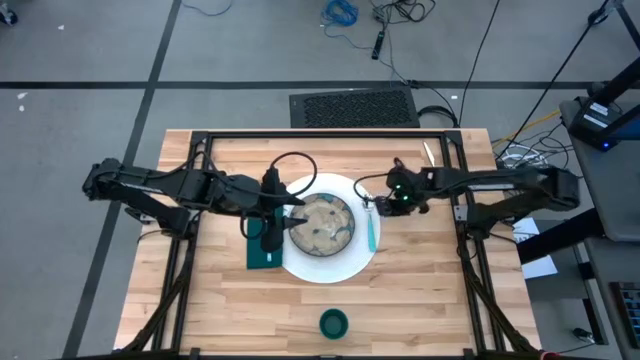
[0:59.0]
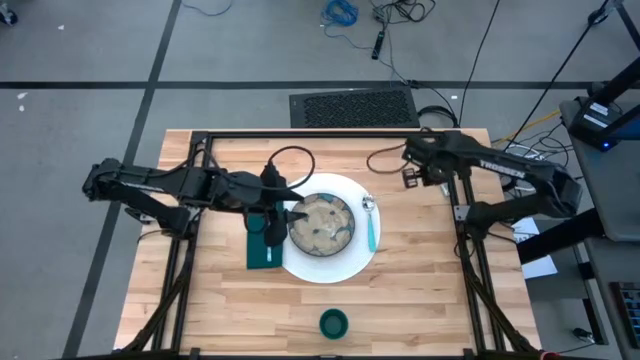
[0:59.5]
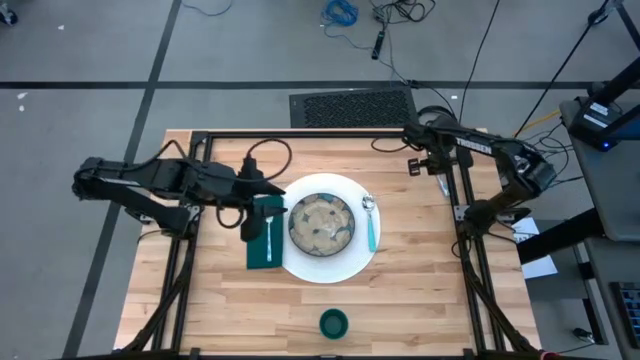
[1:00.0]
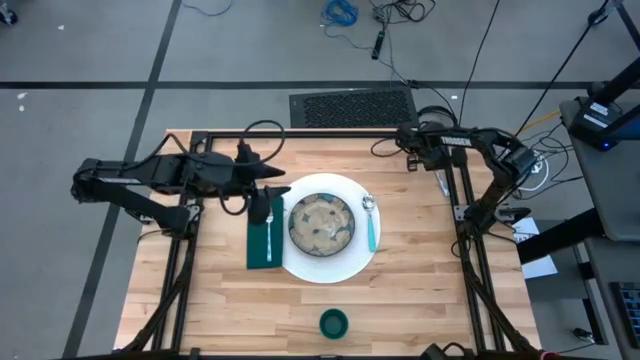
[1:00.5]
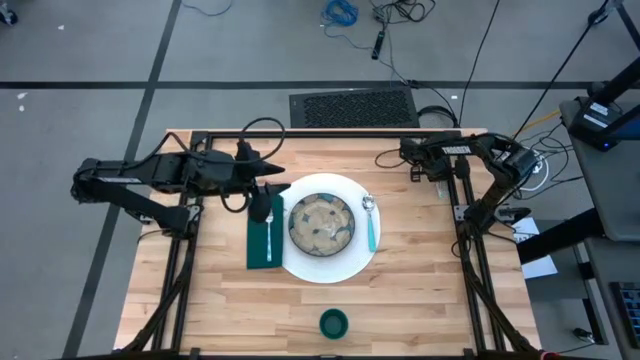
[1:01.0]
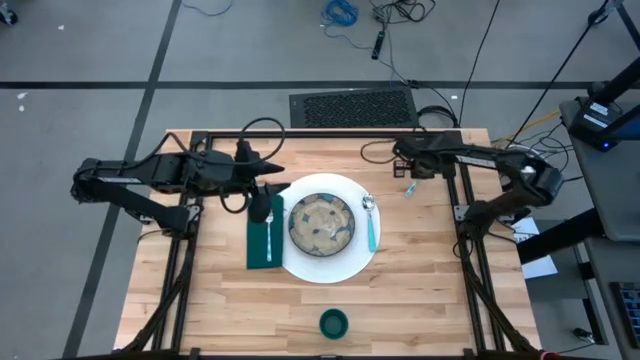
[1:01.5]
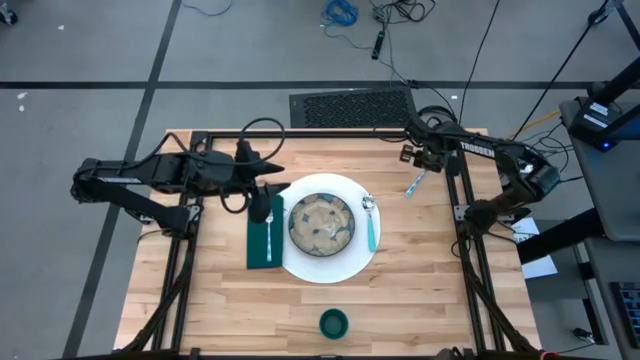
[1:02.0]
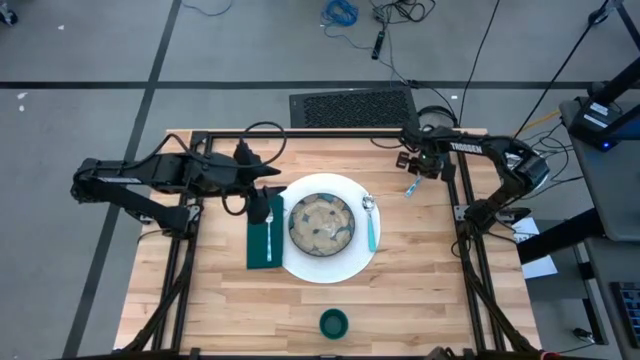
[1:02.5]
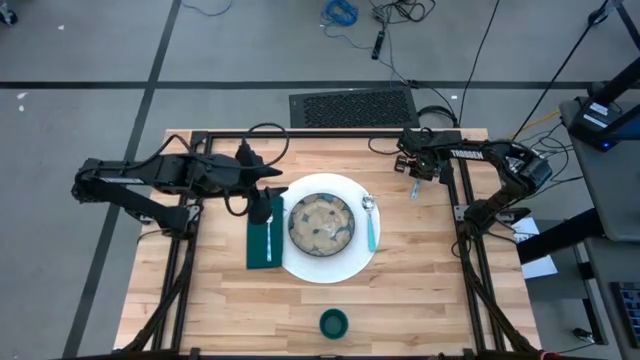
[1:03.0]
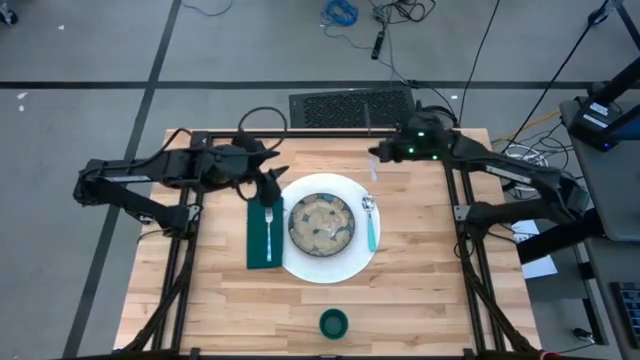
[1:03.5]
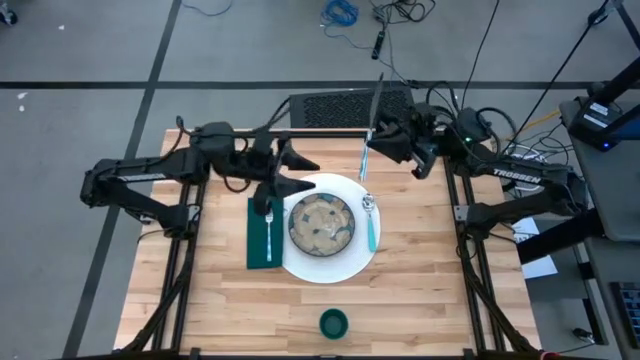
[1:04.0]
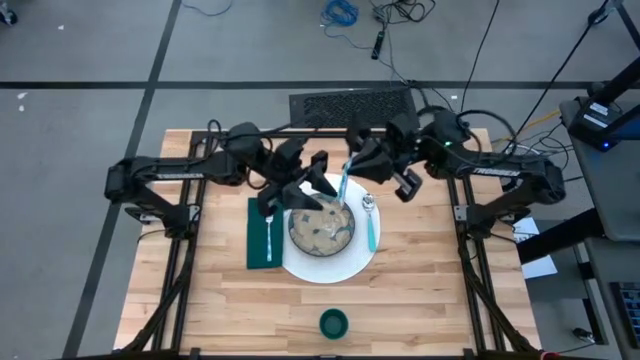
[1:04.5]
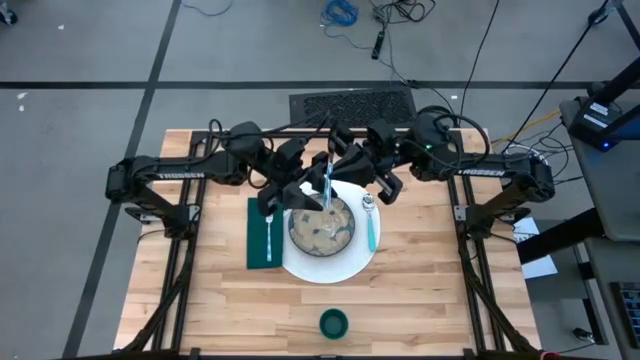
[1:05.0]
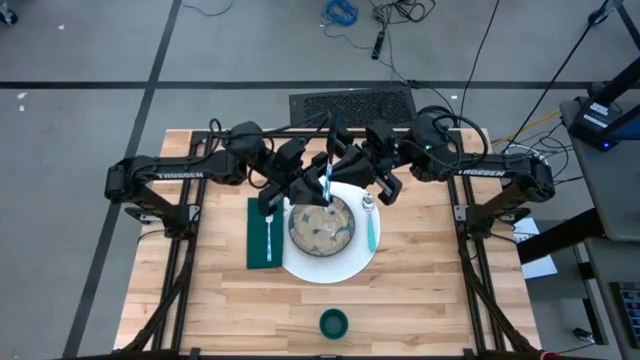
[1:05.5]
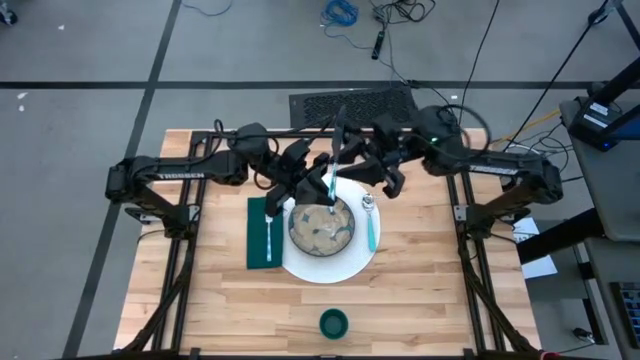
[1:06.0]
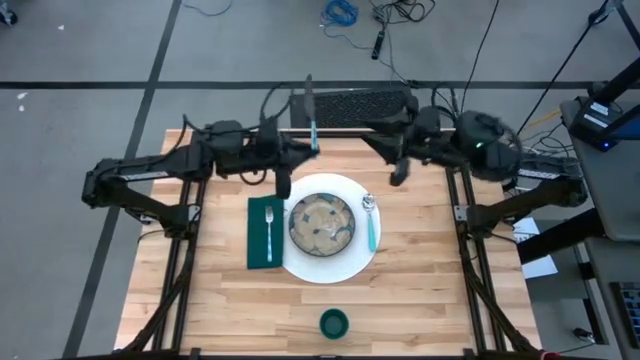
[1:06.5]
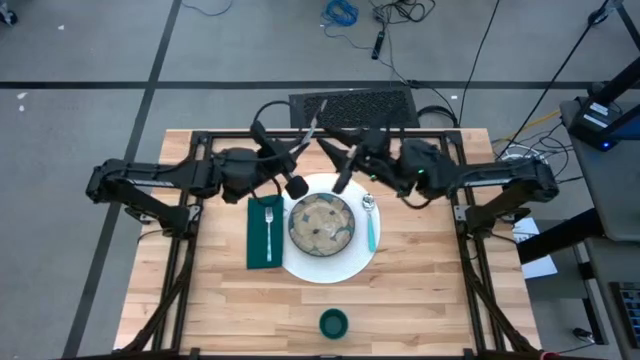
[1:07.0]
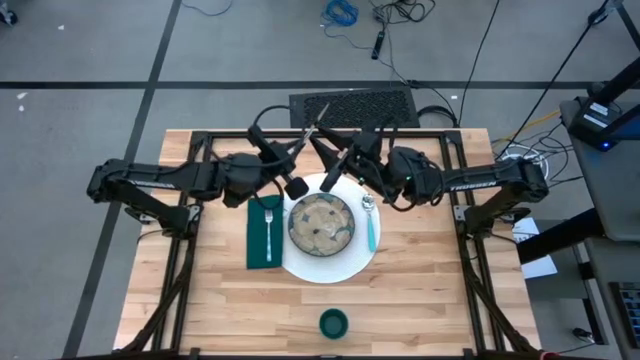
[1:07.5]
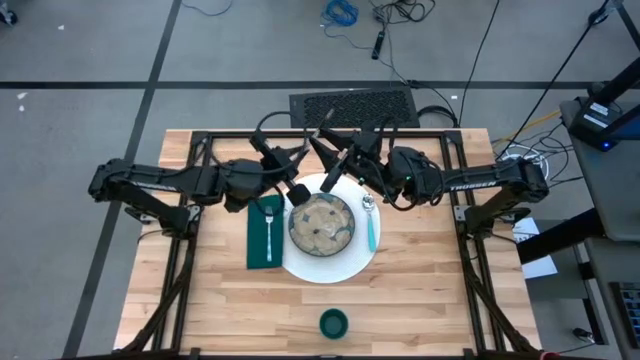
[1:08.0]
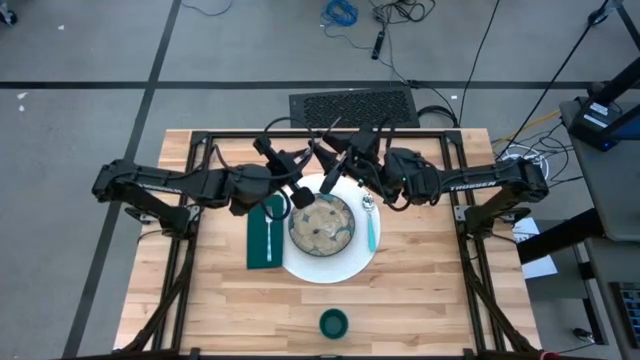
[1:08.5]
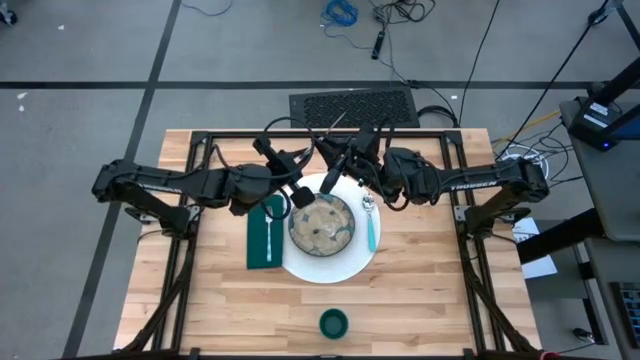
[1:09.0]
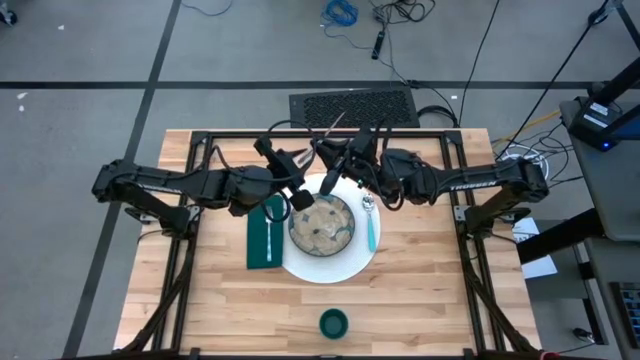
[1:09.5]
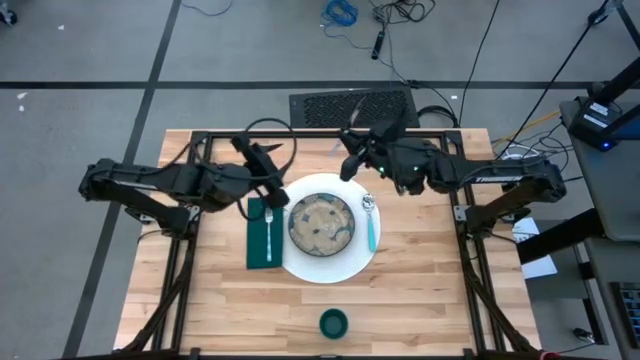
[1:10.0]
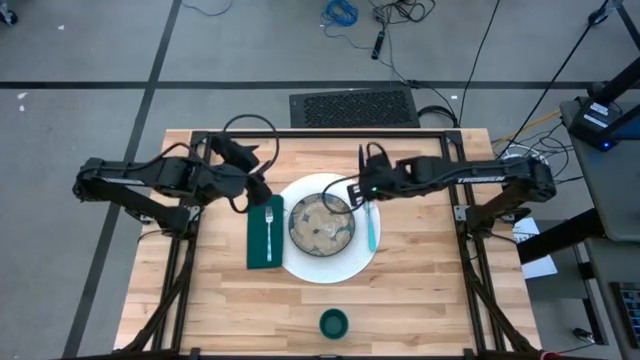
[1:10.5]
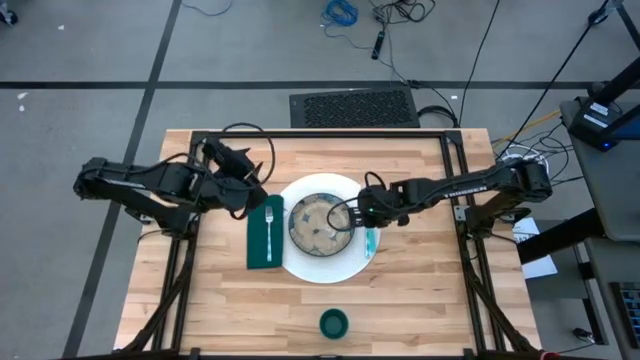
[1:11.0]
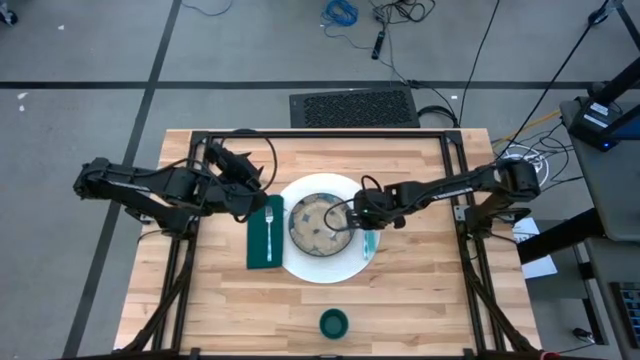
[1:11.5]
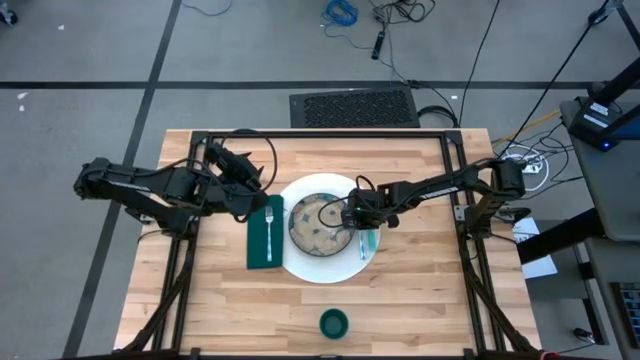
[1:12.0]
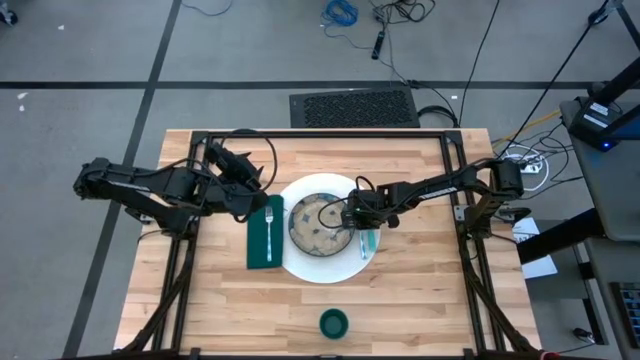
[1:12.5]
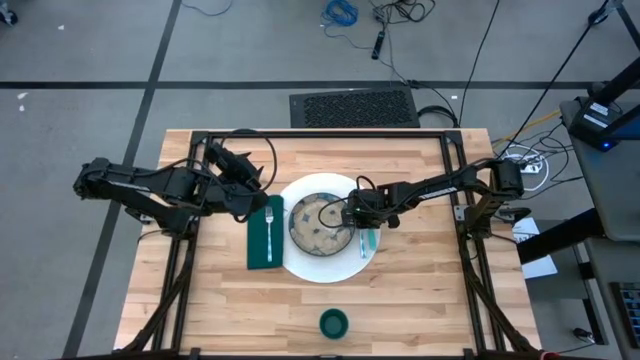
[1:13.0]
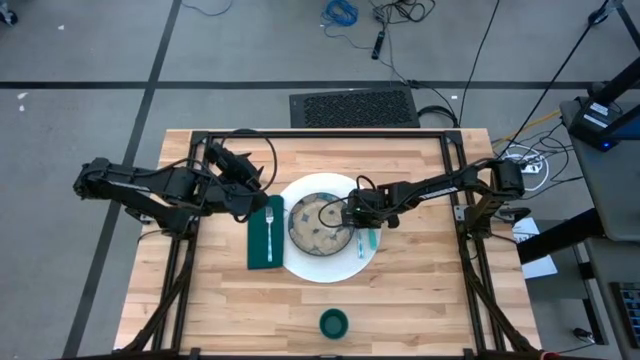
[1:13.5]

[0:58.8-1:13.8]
Task: Set table place
Put the green knife on the right side of the plate

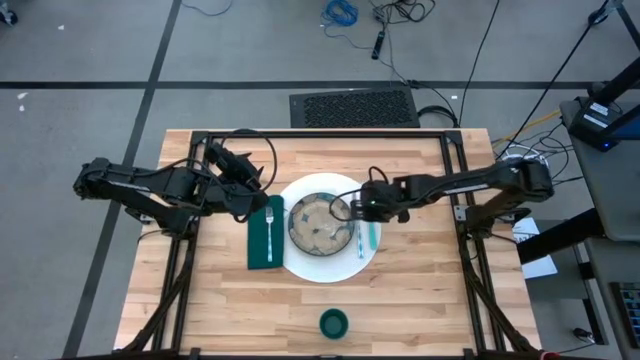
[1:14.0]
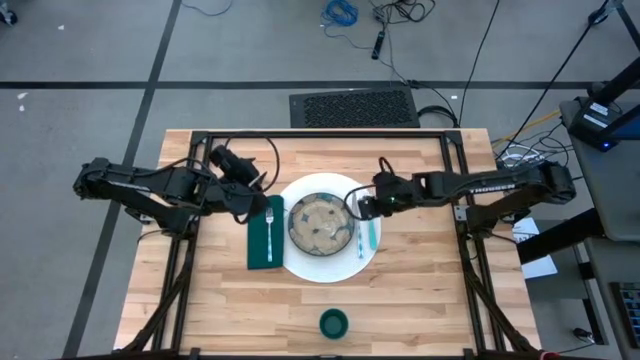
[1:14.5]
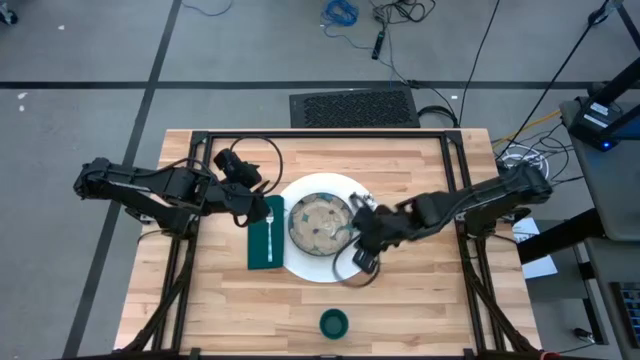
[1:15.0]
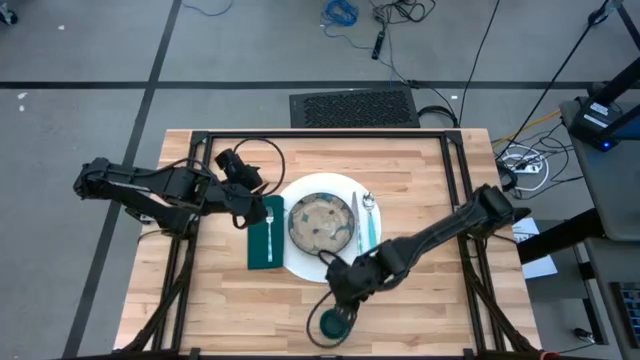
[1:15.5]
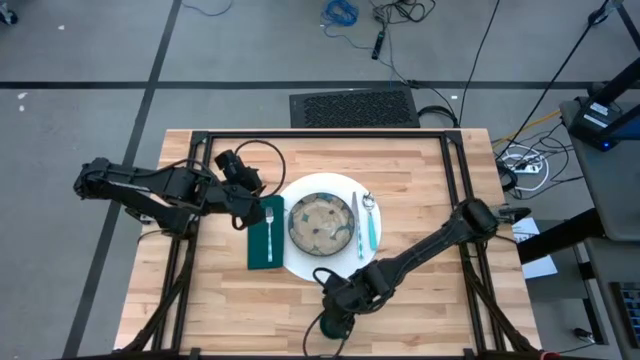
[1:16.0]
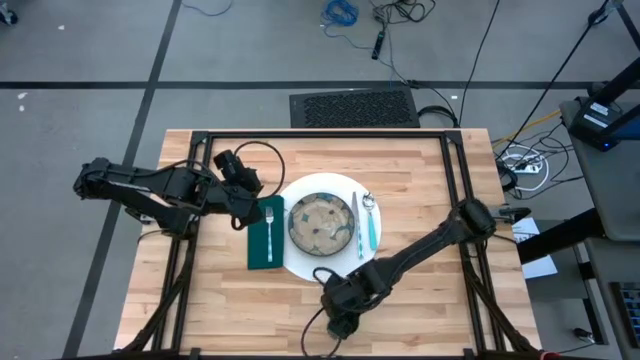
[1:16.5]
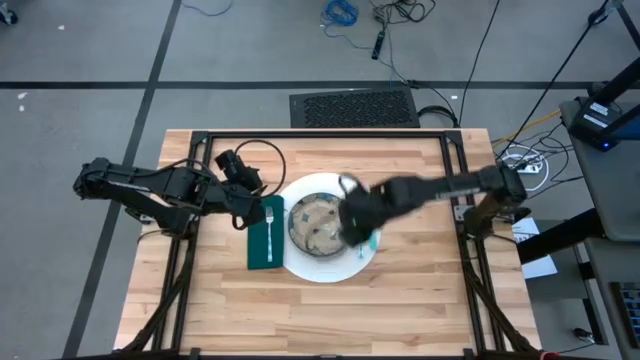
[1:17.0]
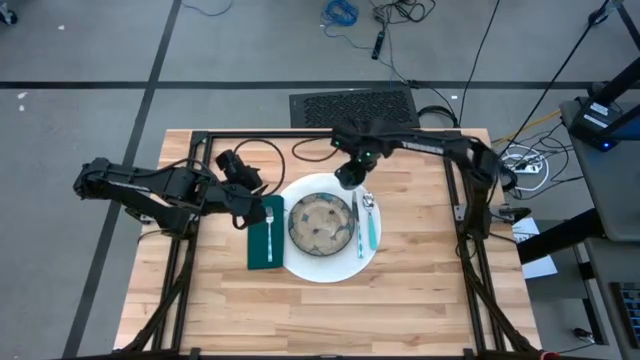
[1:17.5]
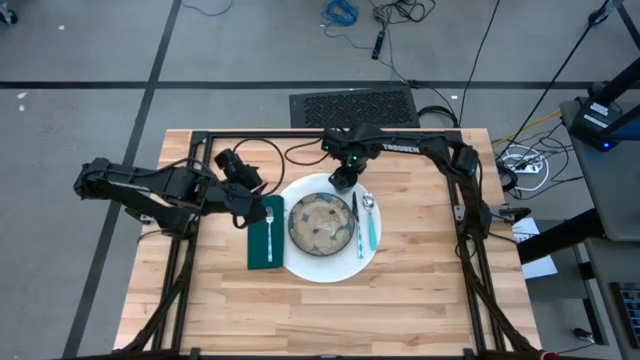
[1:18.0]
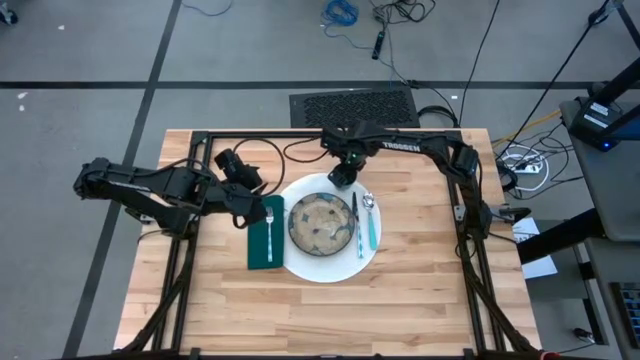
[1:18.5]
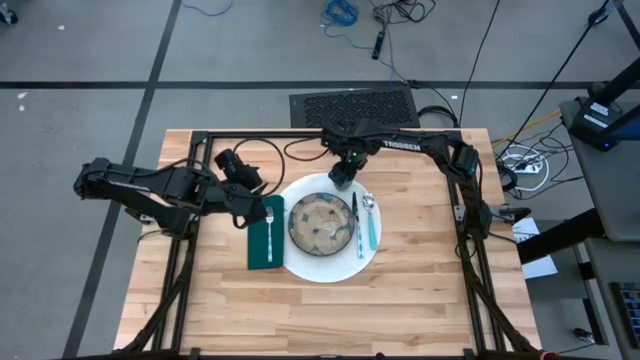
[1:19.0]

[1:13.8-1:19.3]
Put the green cup on the top right side of the brown plate

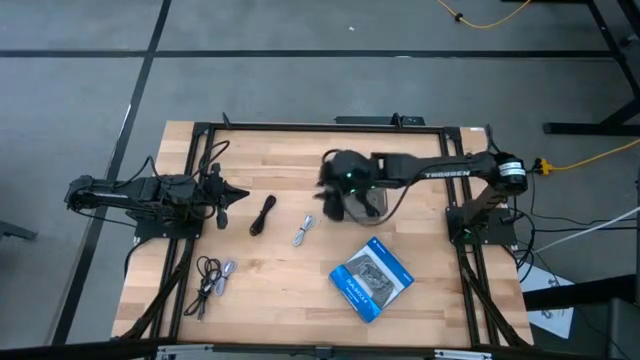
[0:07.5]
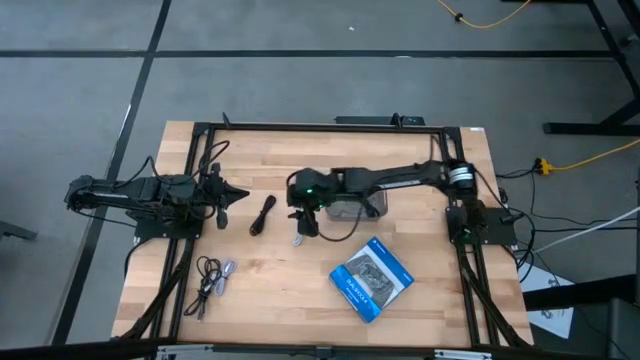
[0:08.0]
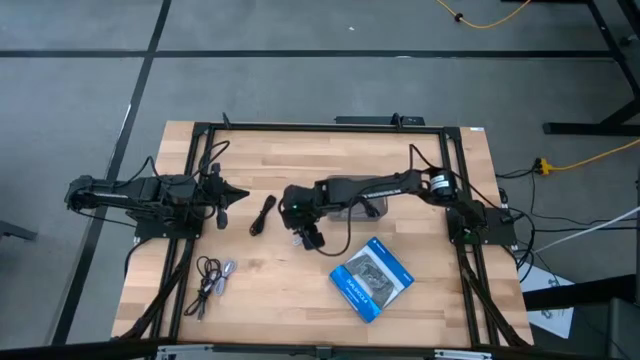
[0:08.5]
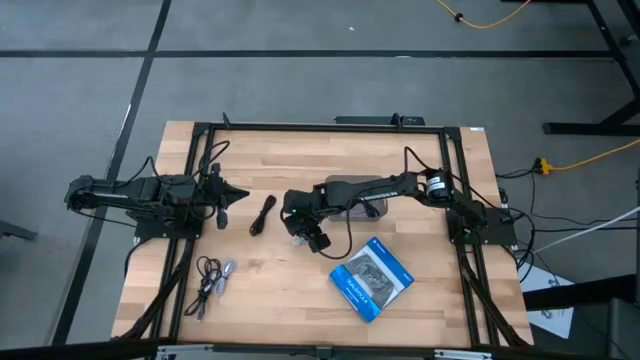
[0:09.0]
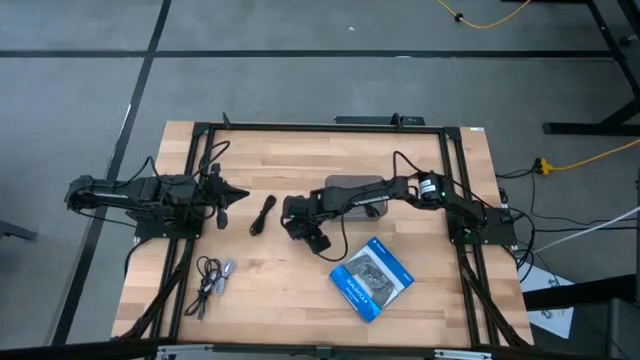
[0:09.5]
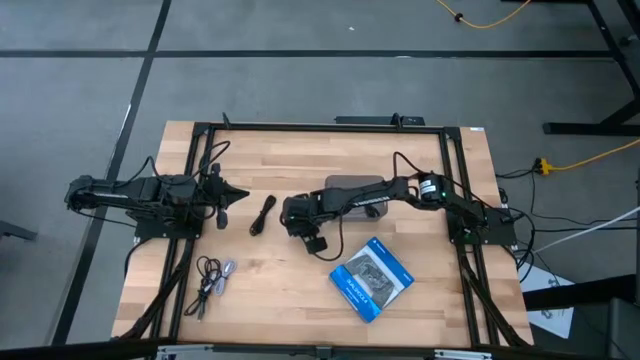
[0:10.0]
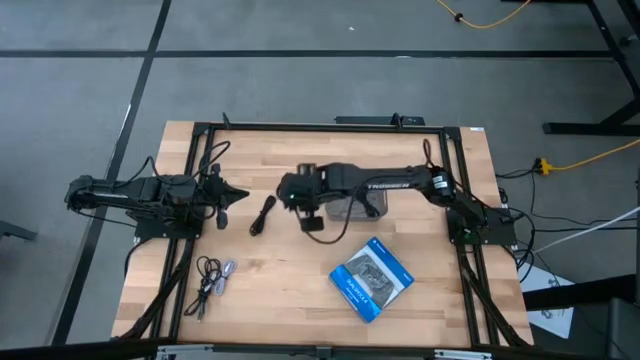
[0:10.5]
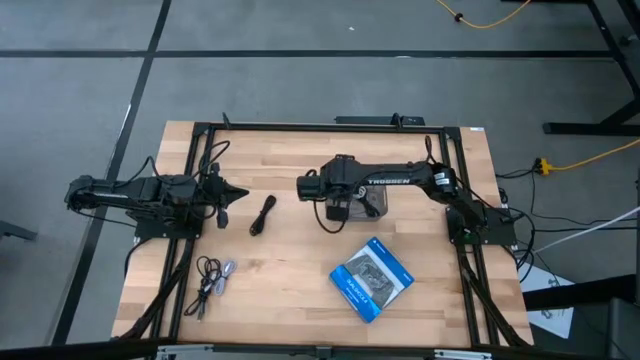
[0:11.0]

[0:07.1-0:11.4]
Task: Pick and place USB-C Cables
Put the white charger cable into the gray bin
